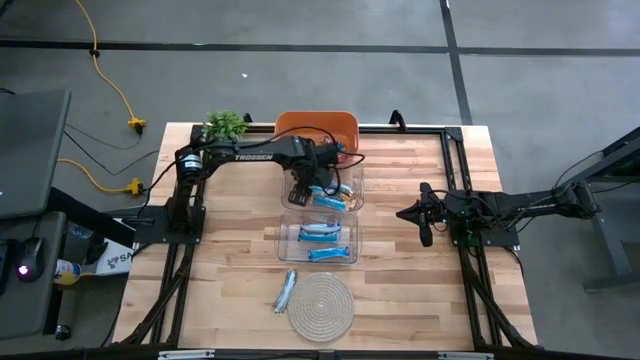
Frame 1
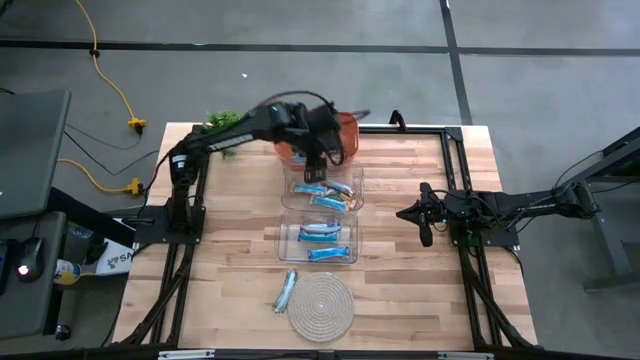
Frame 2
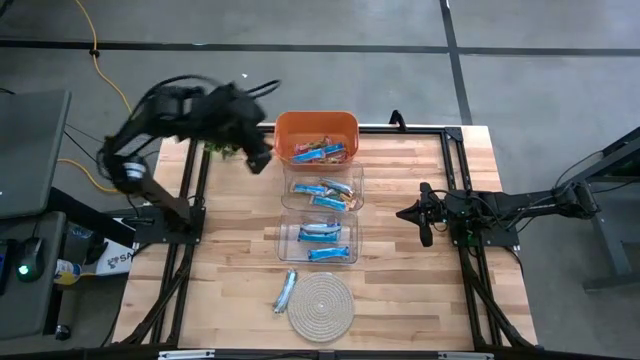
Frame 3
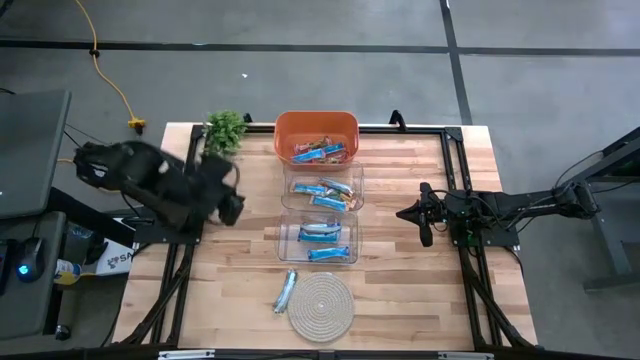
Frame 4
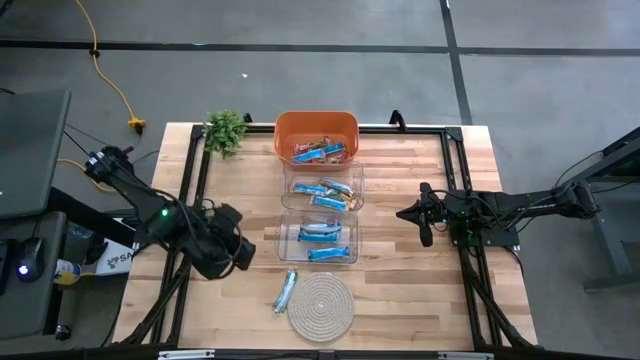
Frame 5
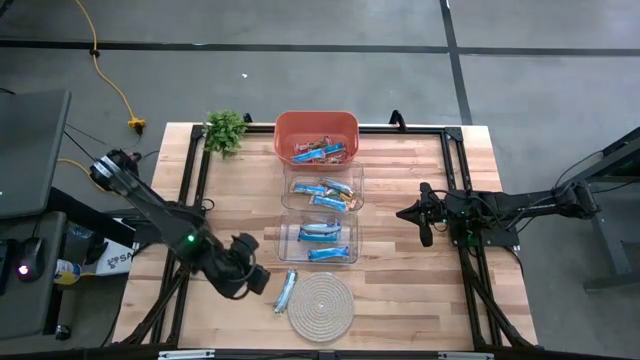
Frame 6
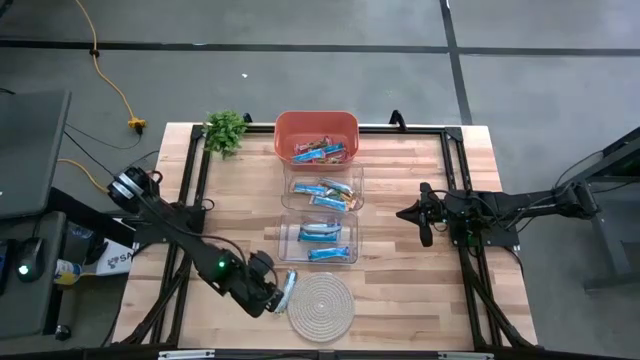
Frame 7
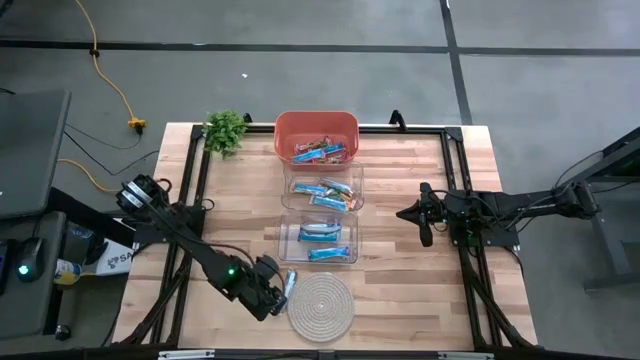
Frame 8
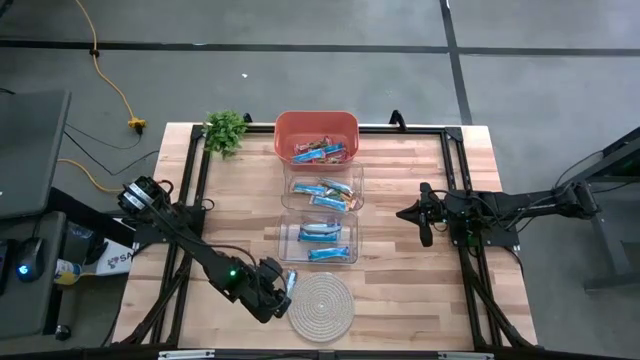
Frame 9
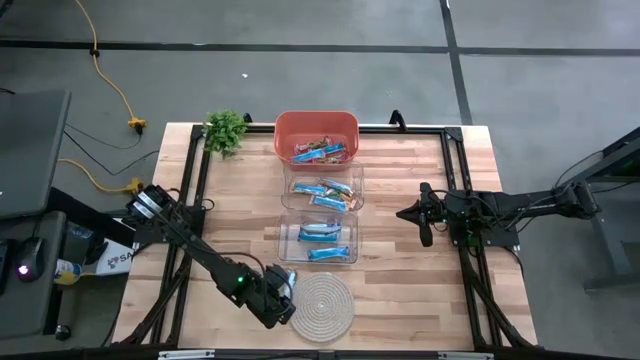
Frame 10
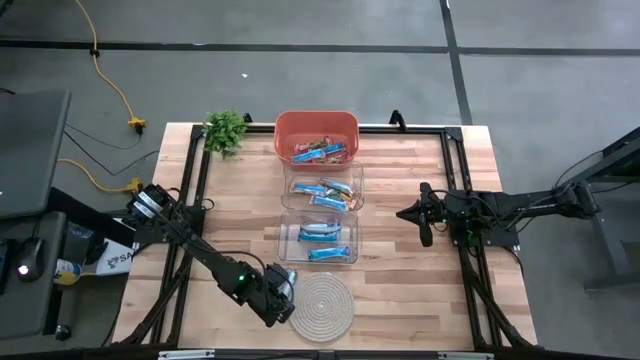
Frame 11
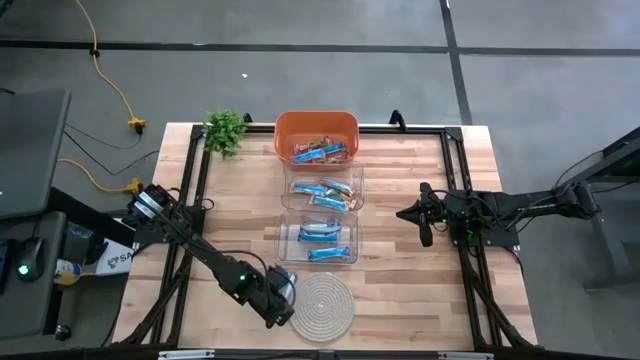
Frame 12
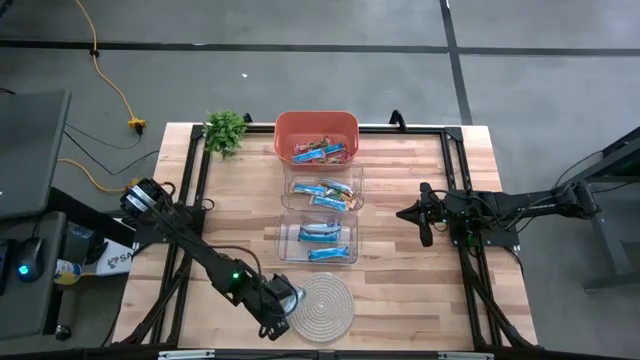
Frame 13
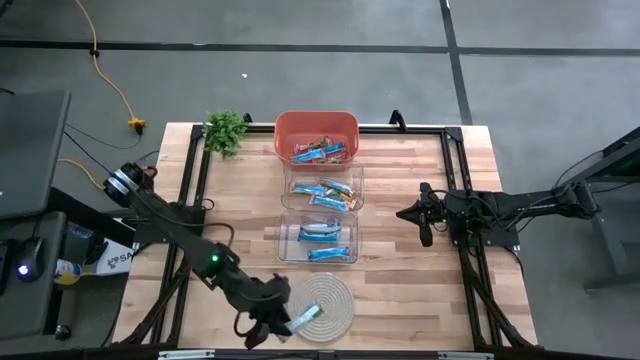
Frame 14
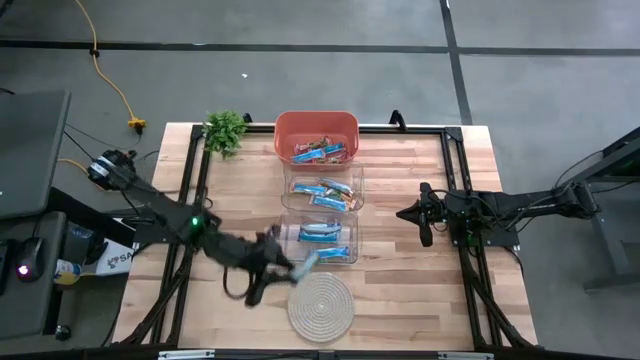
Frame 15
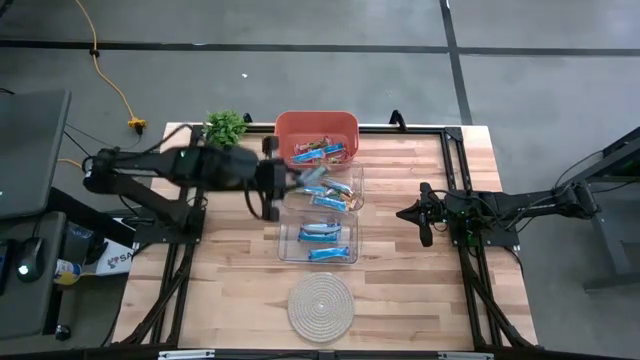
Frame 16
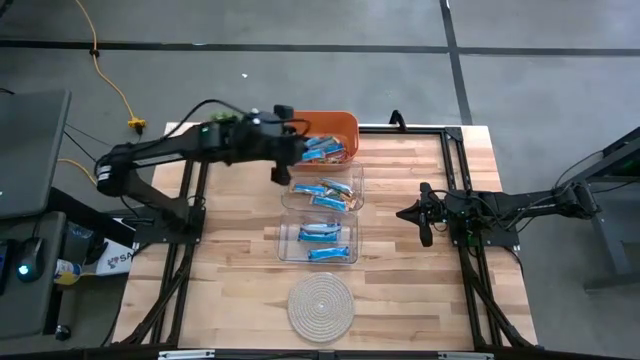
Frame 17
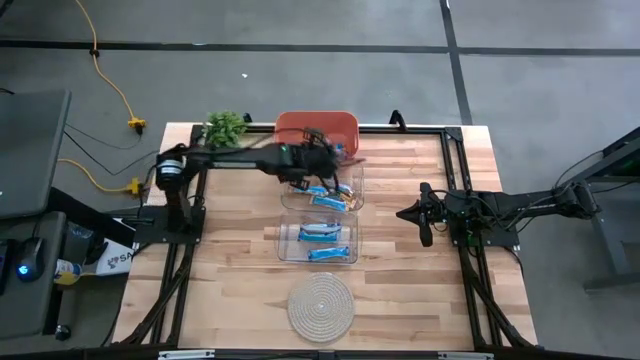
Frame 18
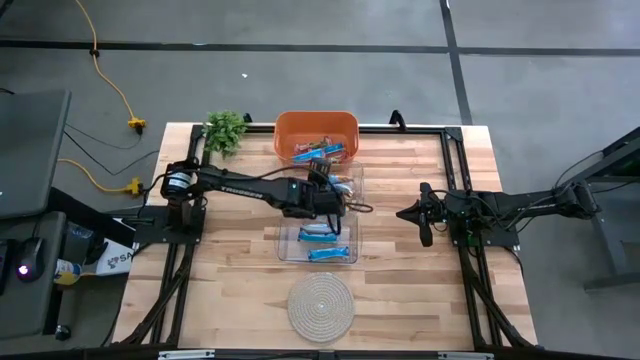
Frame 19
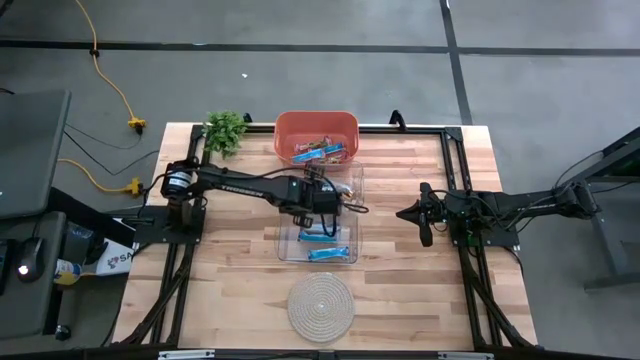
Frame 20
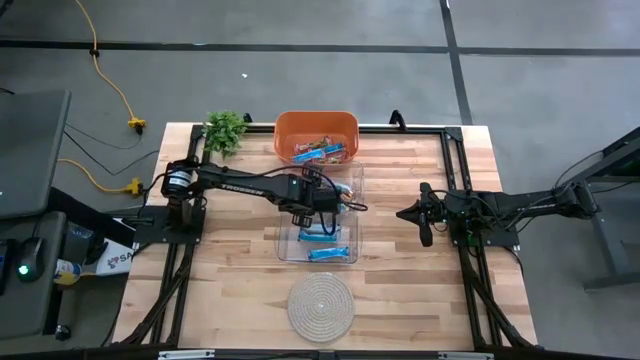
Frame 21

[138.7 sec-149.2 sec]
Task: Pick and place Granola Bars by type
Put the yellow granola bar into the top transparent bin

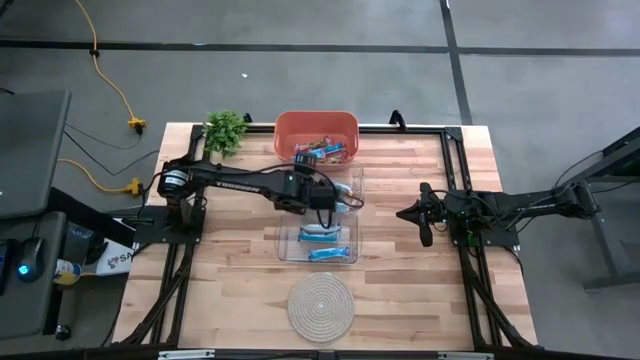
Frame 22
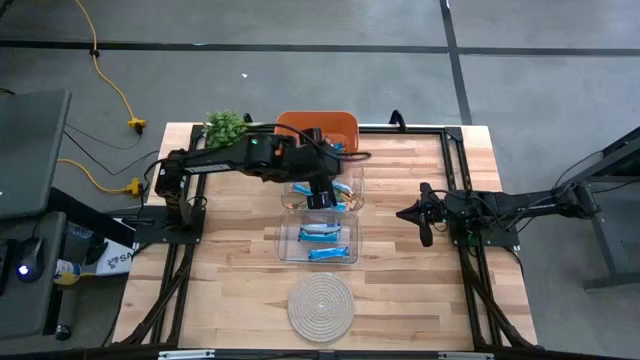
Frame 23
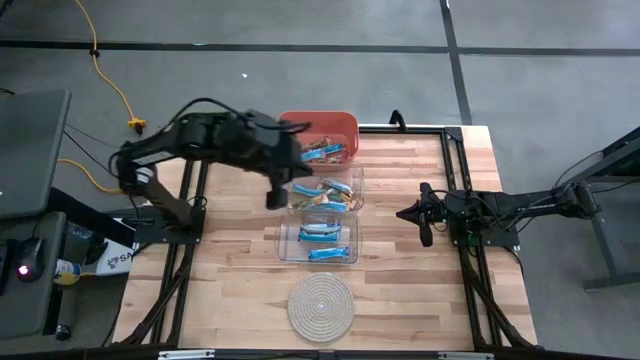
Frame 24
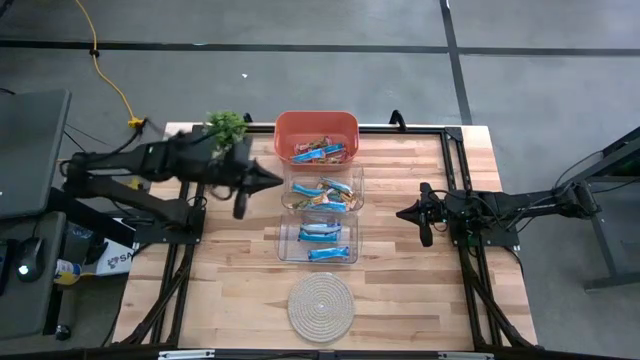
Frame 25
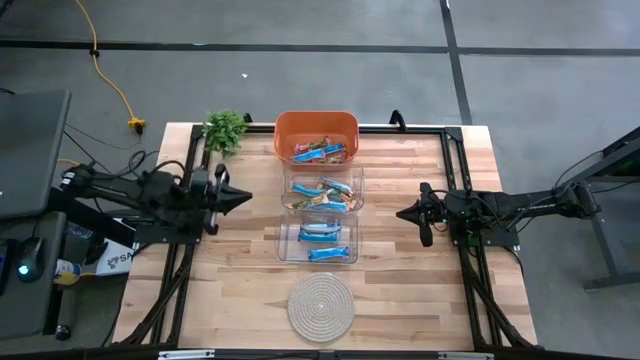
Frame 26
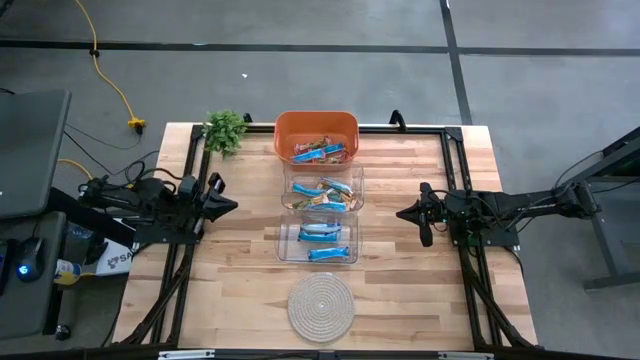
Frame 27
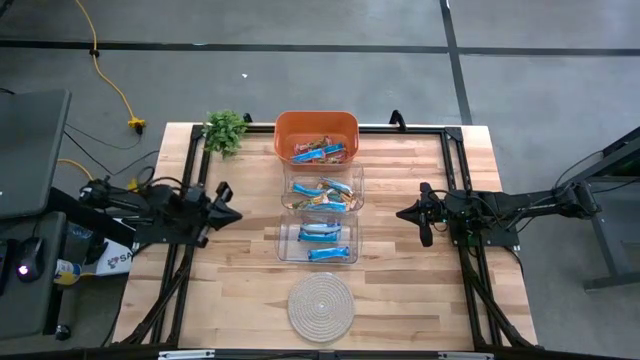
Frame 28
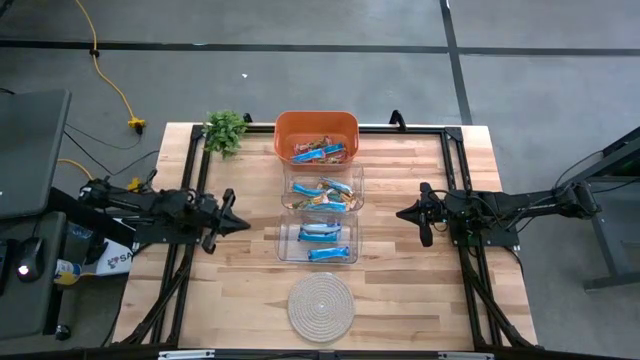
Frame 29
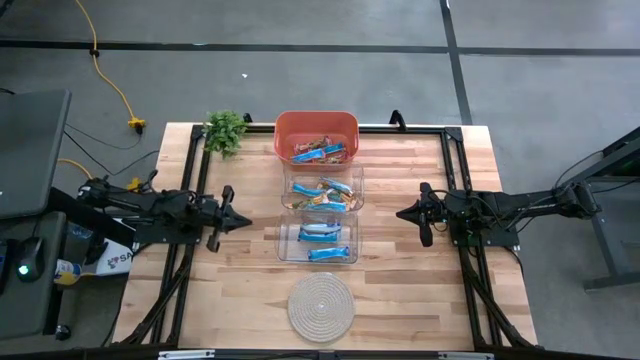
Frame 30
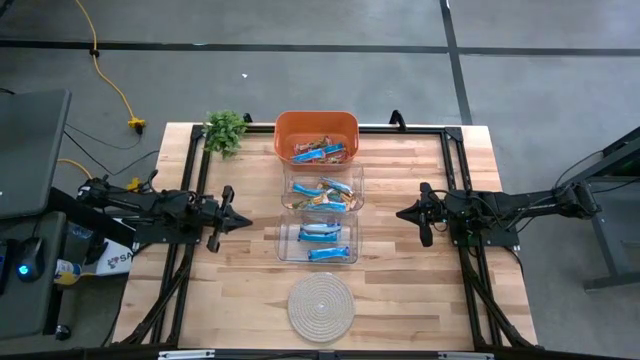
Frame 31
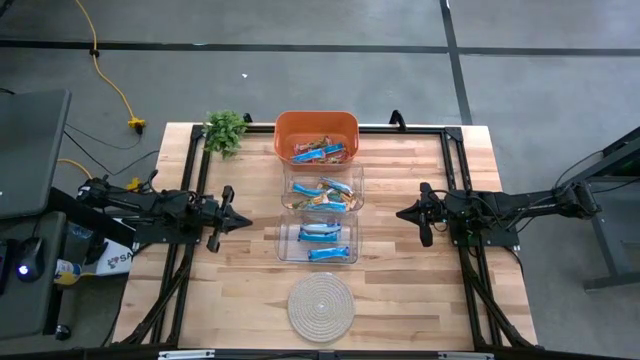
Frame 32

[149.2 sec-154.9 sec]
Return to Home Position

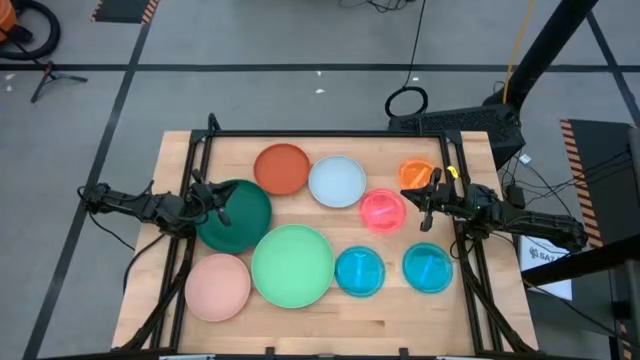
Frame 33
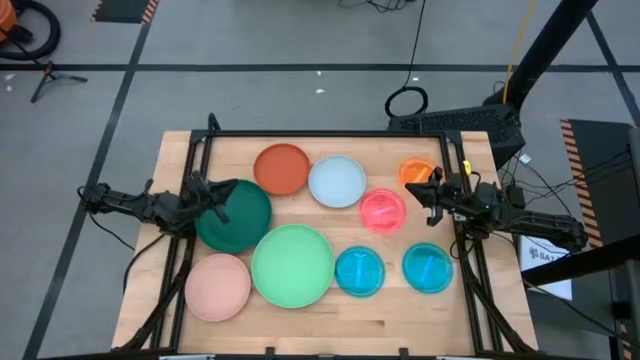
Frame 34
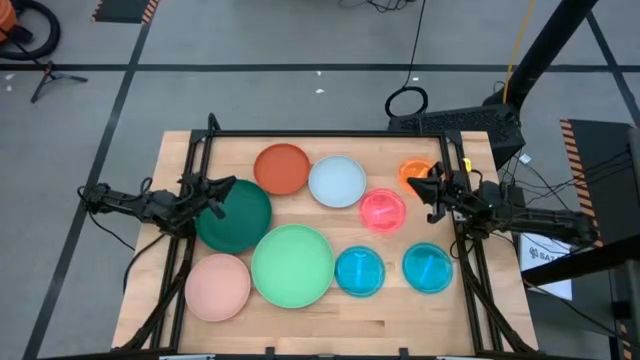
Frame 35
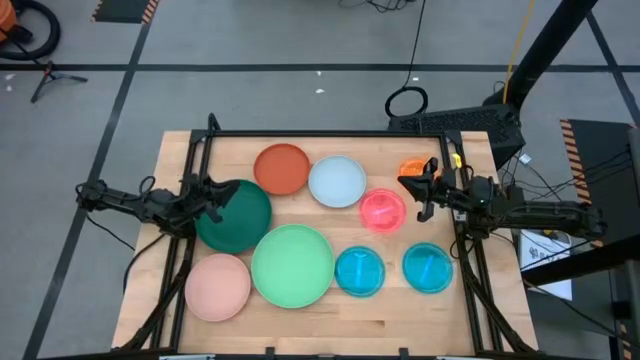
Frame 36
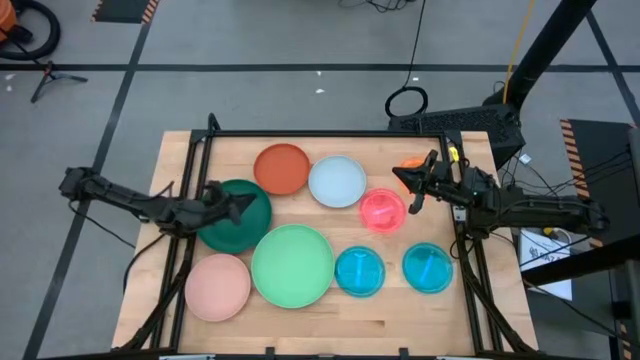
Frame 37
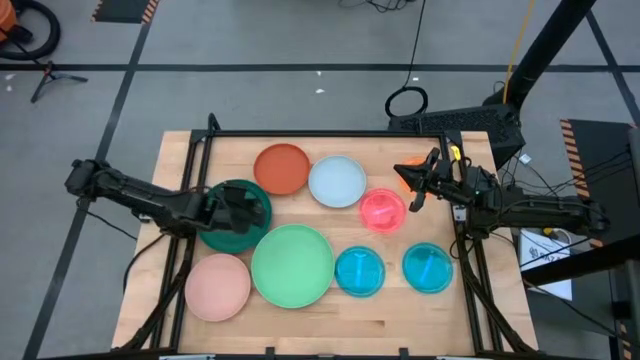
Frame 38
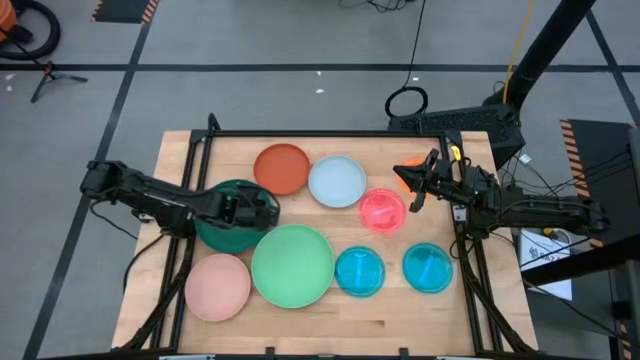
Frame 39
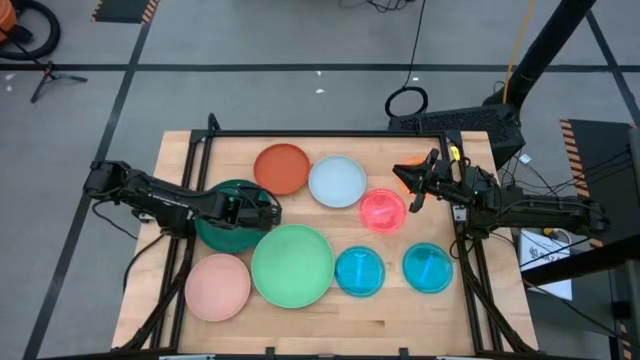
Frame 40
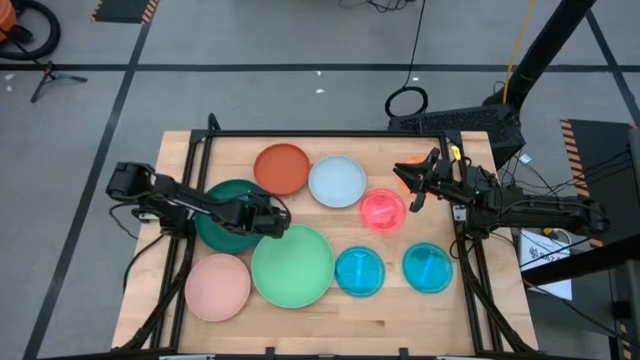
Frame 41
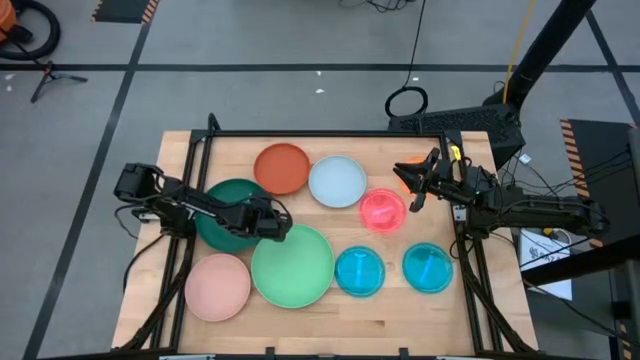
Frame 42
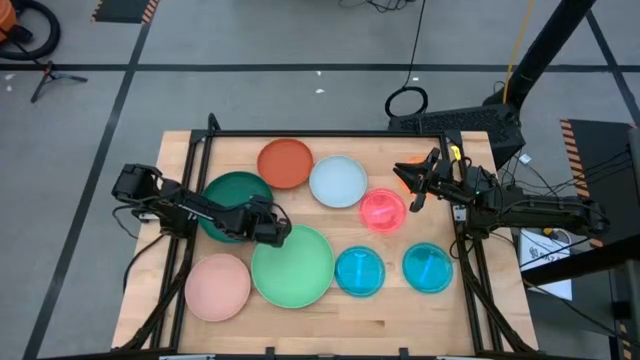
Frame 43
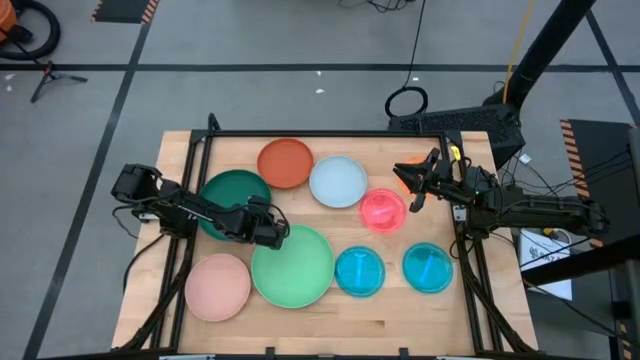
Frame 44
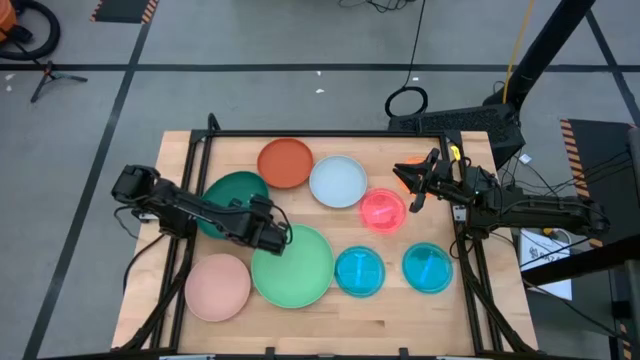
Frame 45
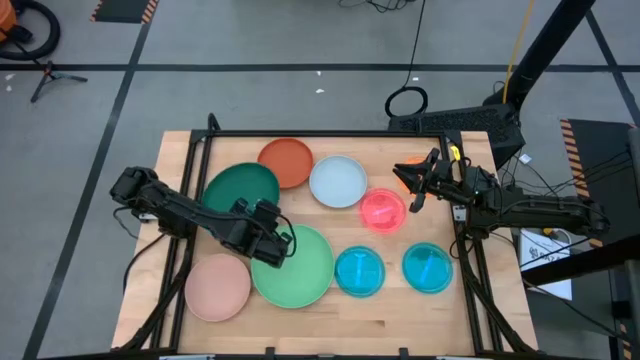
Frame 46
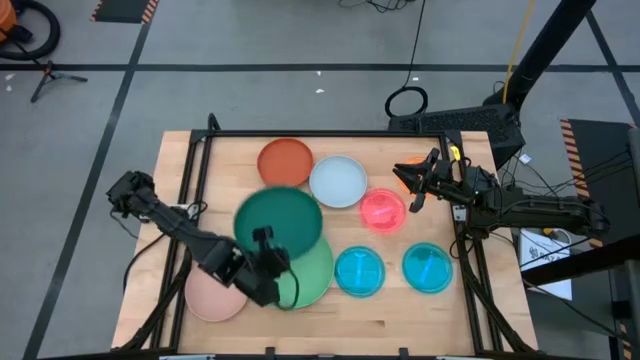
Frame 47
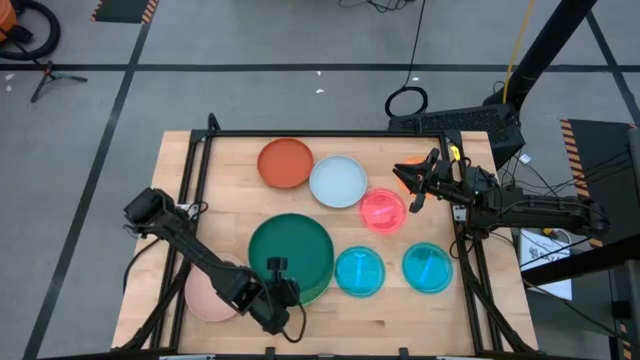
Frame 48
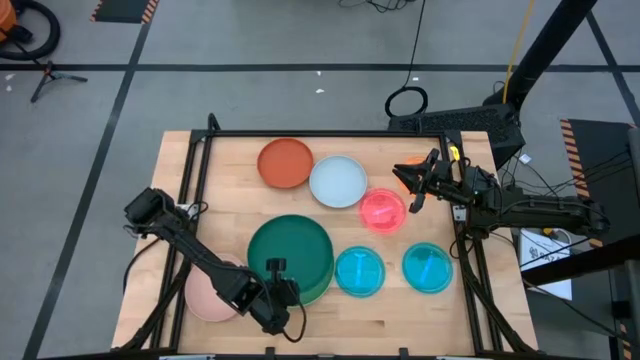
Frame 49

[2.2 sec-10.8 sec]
Task: Stack plastic plates
Stack the dark green plate on top of the green plate
